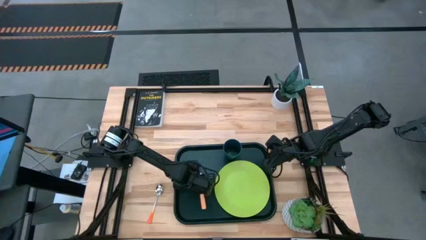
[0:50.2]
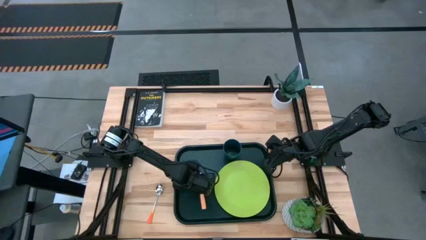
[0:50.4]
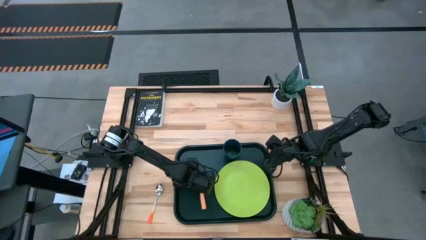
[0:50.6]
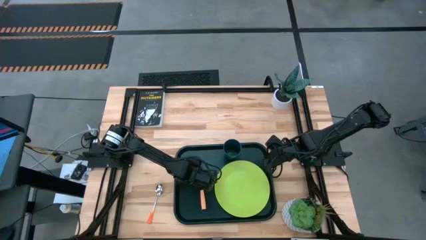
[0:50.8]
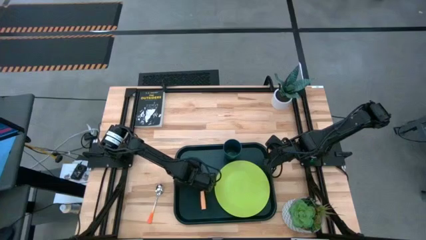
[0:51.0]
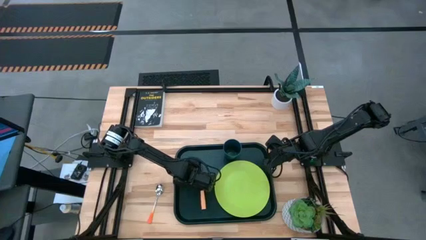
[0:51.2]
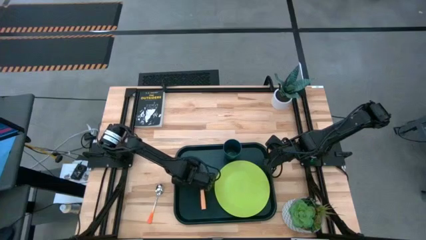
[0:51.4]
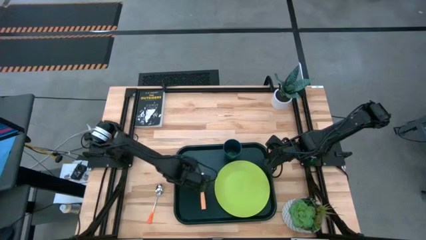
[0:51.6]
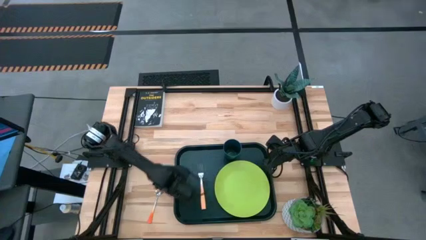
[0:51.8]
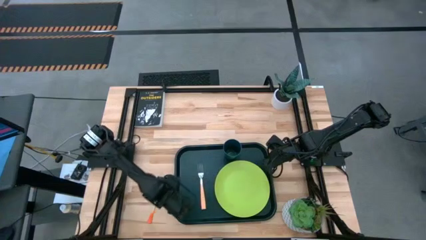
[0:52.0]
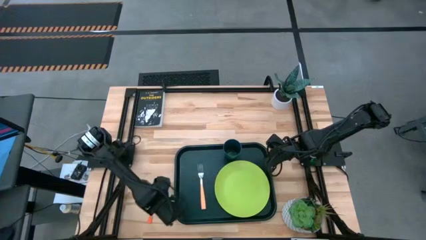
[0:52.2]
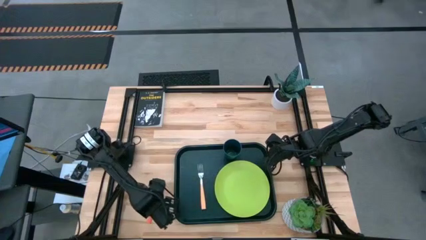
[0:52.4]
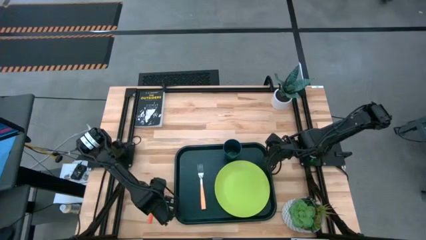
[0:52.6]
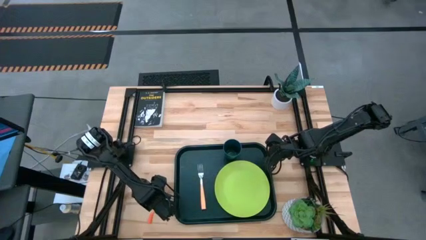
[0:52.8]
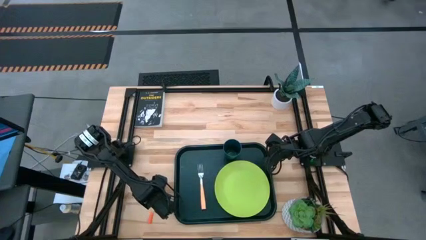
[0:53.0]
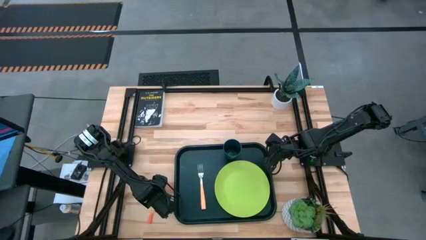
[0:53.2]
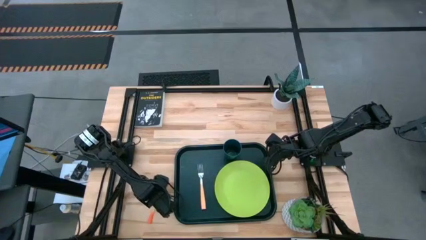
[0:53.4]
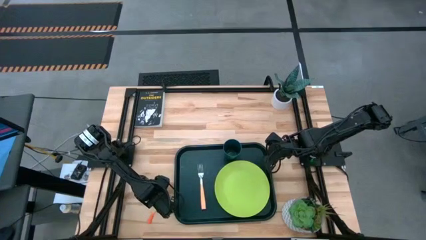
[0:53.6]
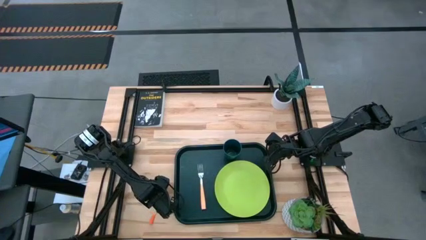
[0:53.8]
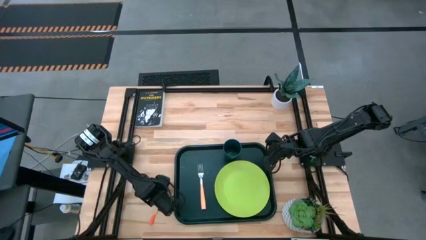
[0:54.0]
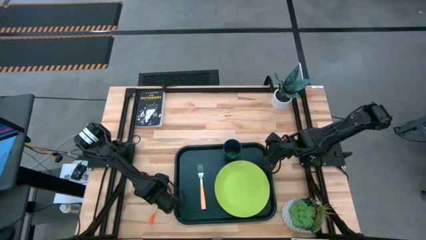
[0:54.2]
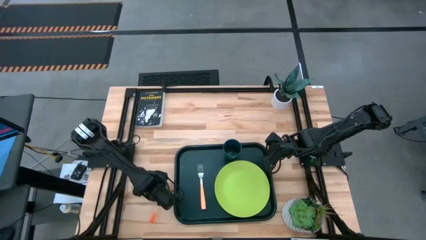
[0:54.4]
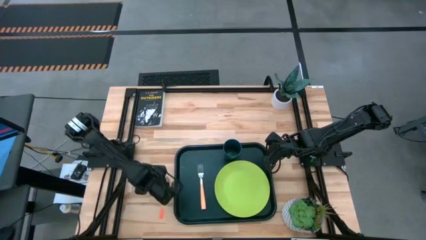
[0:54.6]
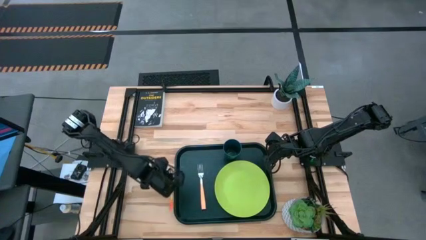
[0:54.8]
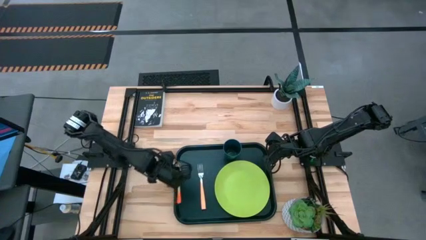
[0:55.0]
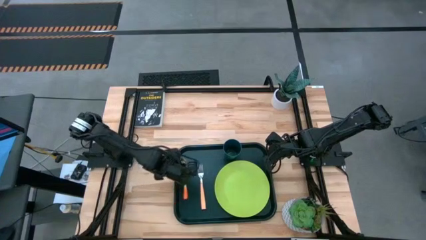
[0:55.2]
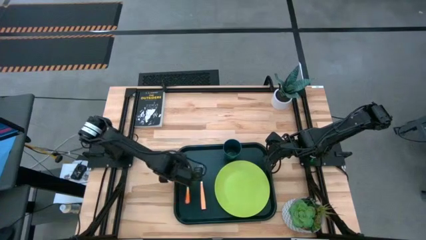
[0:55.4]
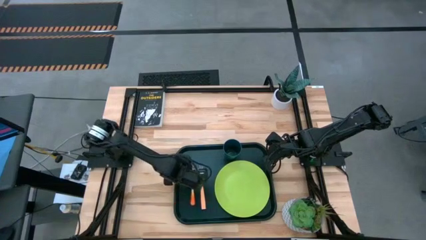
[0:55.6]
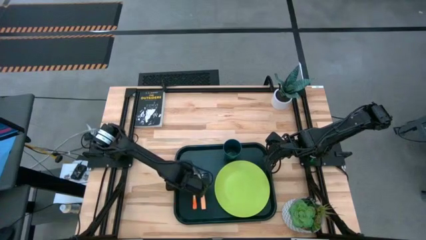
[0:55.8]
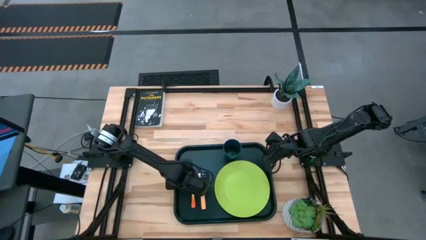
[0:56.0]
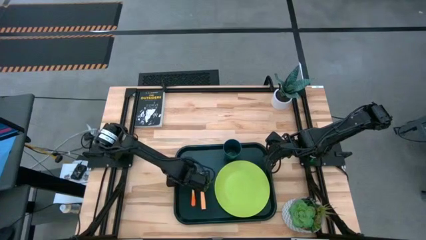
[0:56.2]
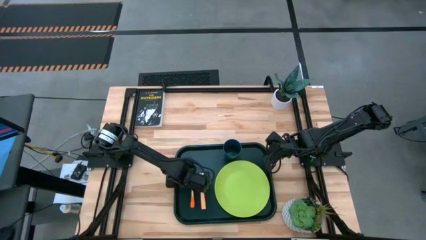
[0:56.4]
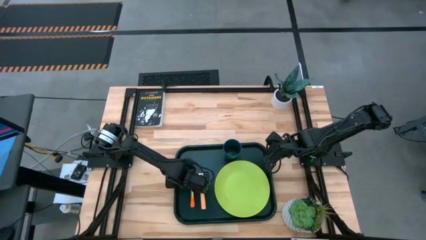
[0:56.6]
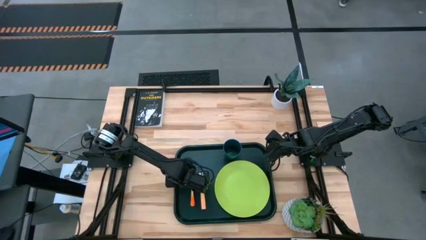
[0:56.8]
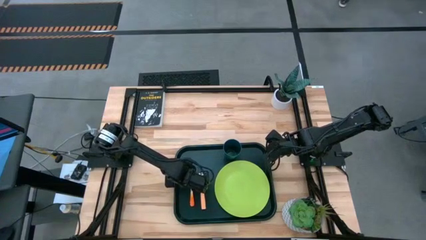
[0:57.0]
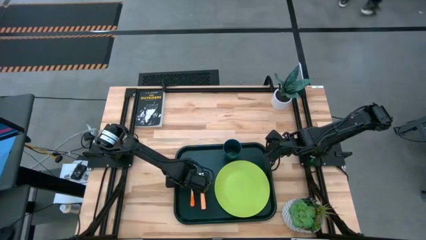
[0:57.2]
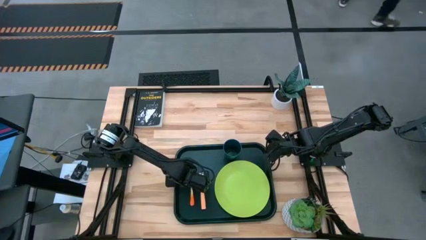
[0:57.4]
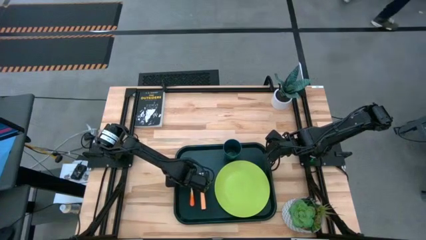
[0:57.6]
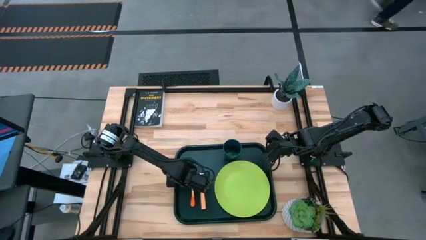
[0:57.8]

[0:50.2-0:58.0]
Task: Pick and place plate/cup/fork/spoon on tray
Put the orange spoon on the black tray to the left of the orange fork

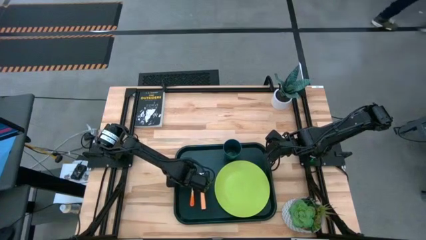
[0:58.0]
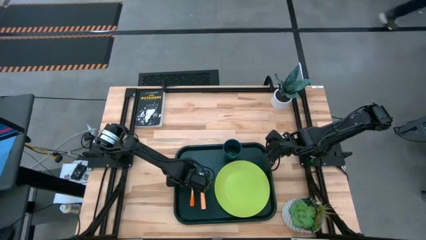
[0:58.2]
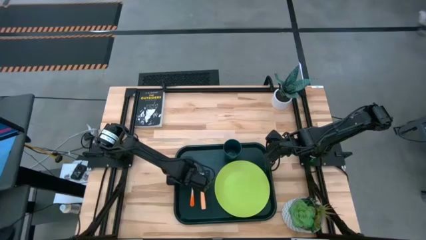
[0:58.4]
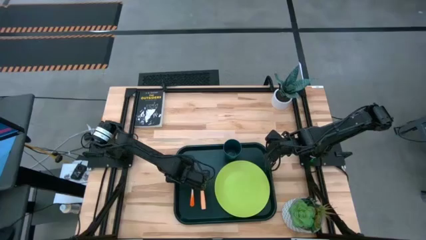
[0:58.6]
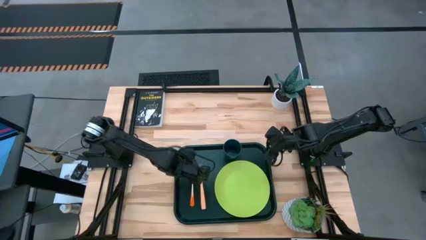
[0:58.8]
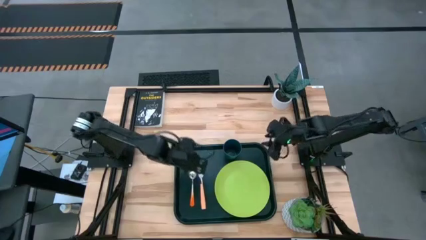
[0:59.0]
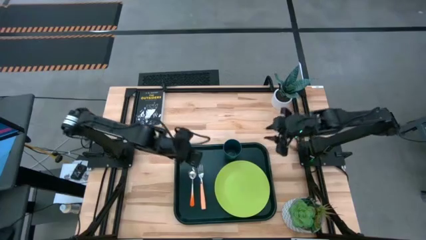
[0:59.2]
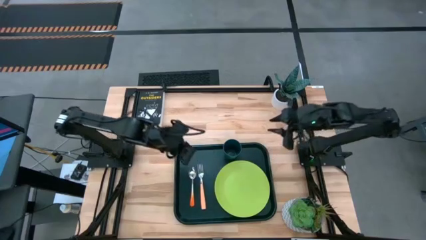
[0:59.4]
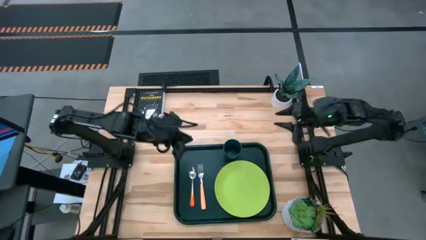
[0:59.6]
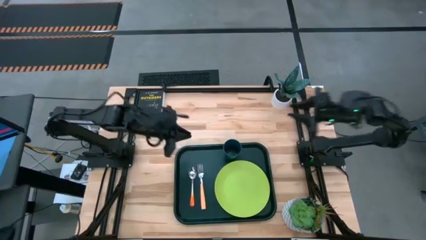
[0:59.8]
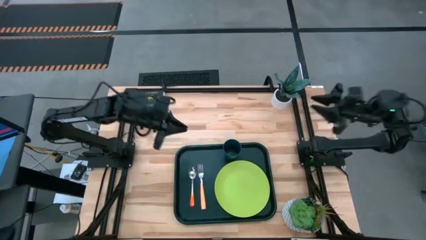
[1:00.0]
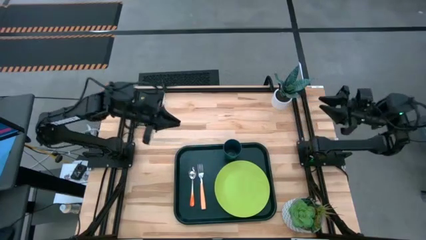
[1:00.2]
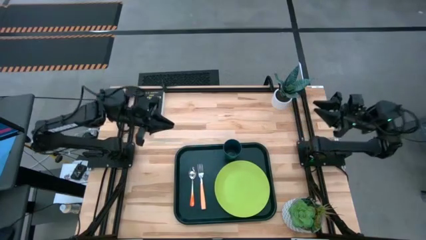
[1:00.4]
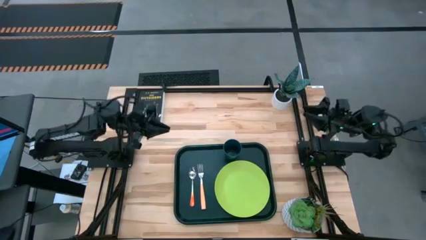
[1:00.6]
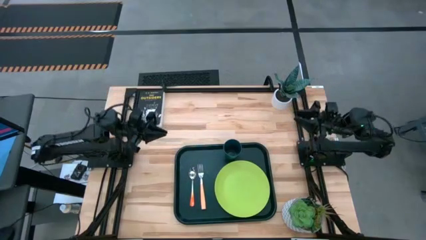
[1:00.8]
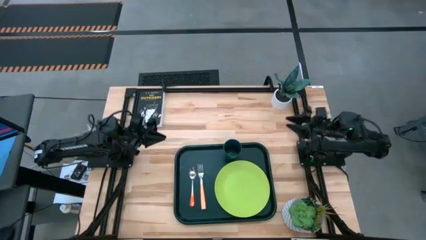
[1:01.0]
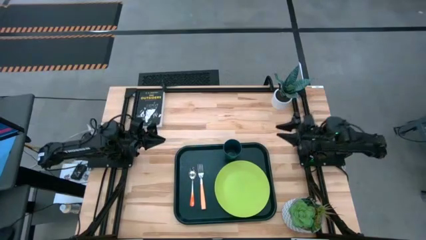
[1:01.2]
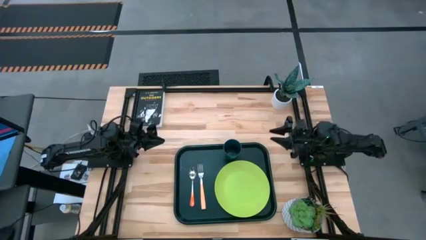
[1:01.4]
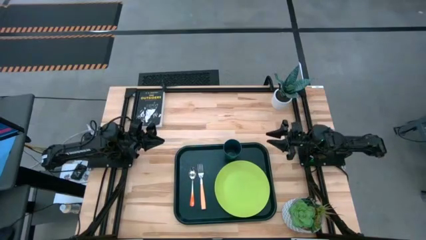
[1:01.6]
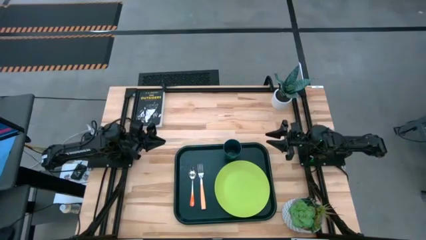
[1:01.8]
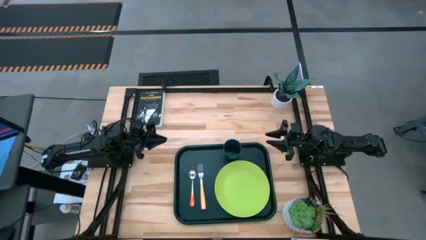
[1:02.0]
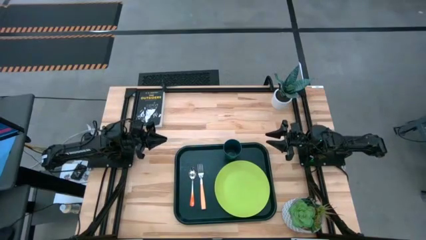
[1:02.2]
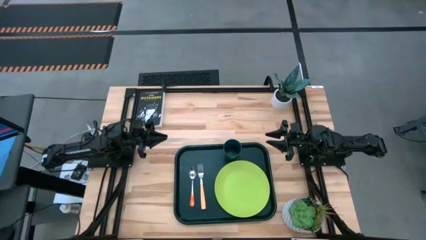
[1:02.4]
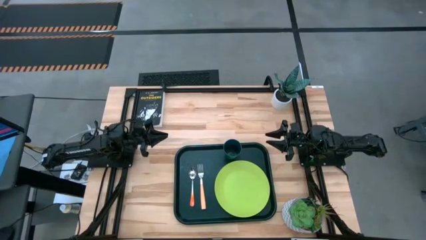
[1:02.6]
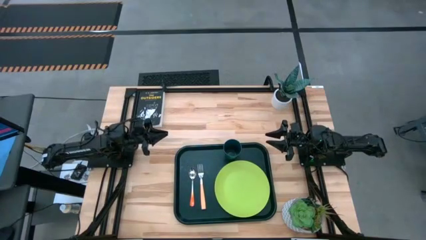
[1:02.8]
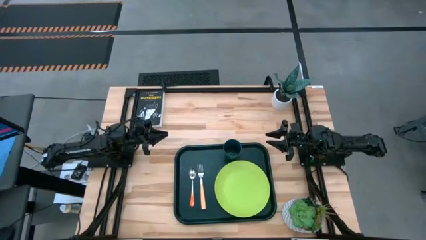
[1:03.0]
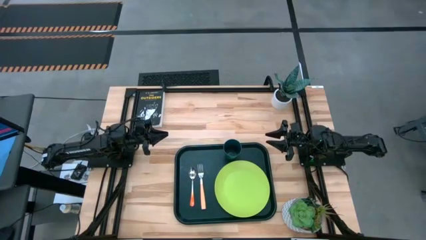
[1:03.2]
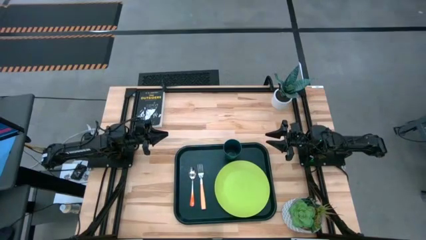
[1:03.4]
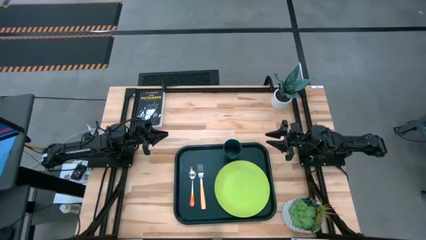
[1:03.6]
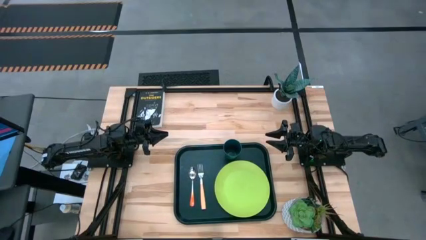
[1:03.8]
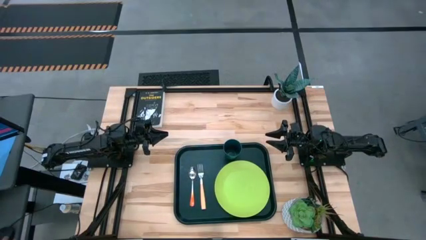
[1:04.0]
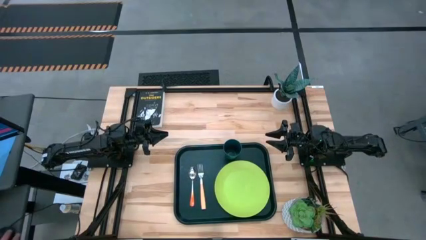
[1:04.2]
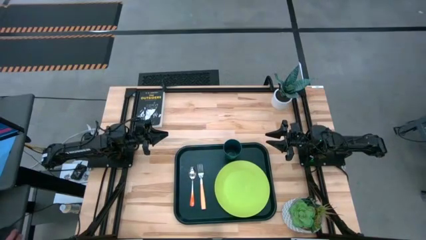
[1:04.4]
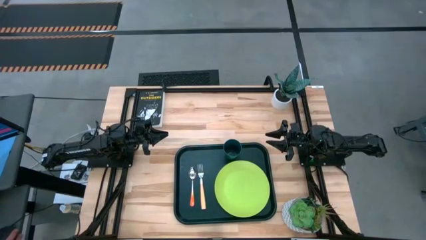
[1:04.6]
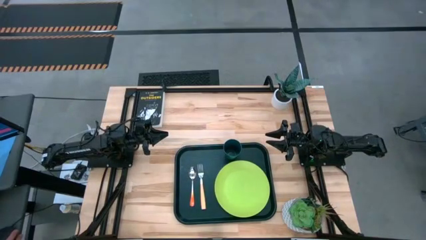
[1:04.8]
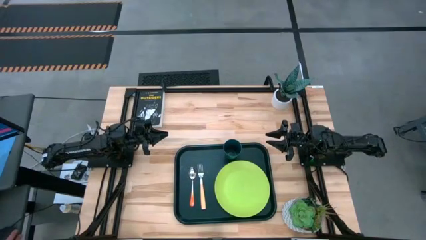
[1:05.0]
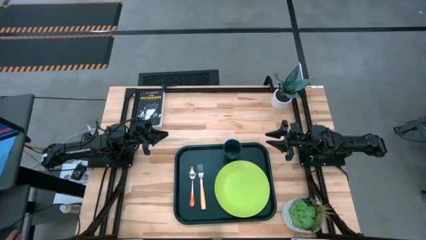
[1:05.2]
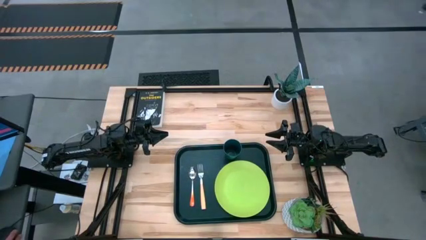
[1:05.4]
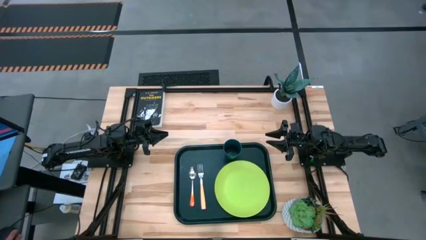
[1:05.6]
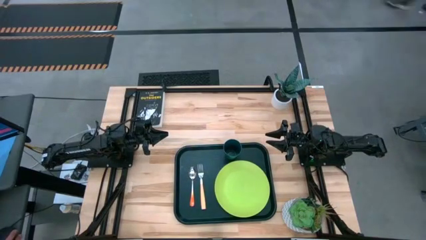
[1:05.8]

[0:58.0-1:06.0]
Return to Home Position
